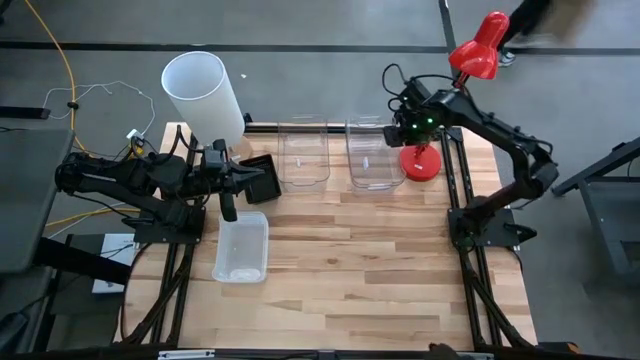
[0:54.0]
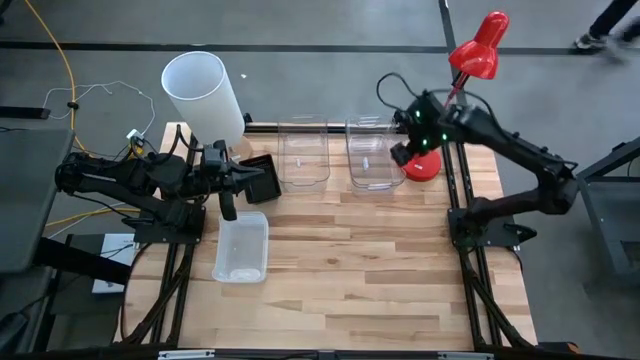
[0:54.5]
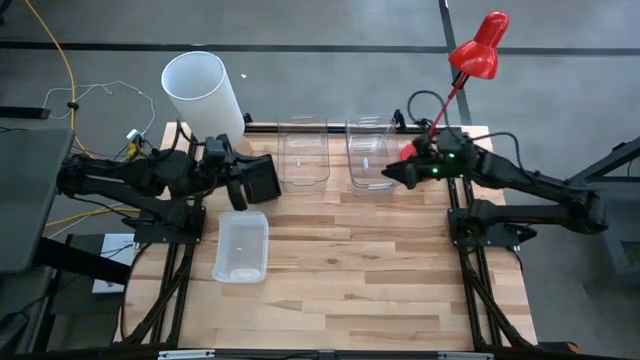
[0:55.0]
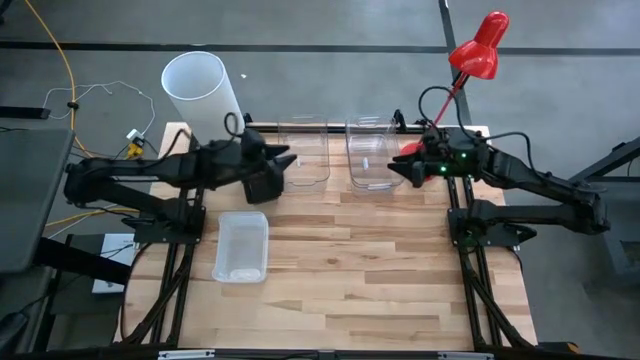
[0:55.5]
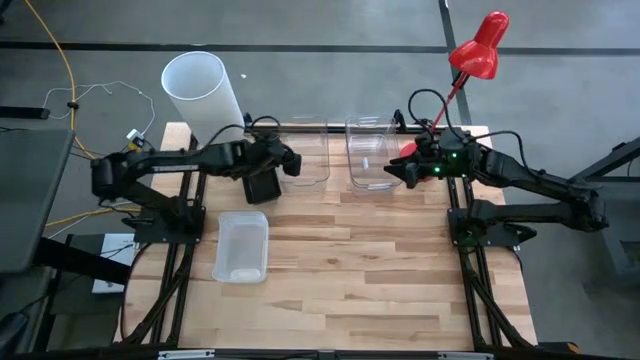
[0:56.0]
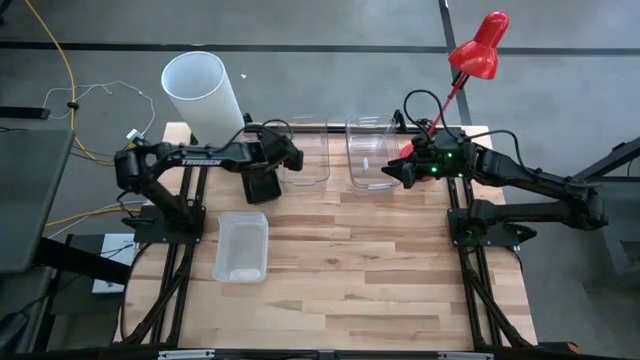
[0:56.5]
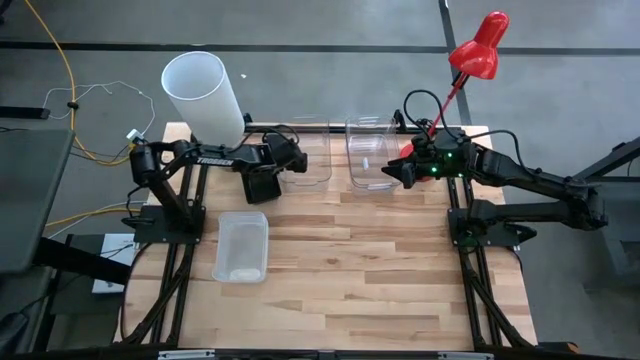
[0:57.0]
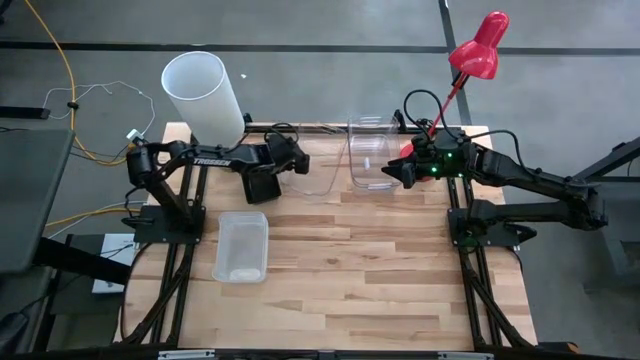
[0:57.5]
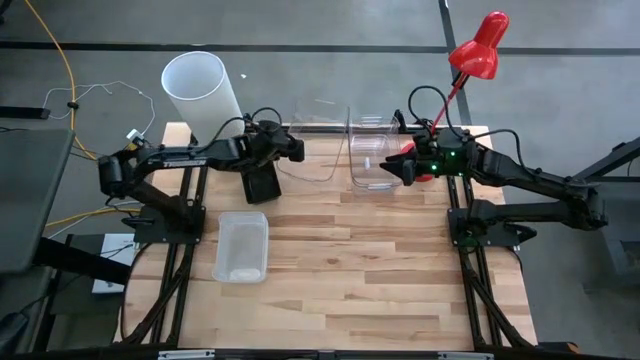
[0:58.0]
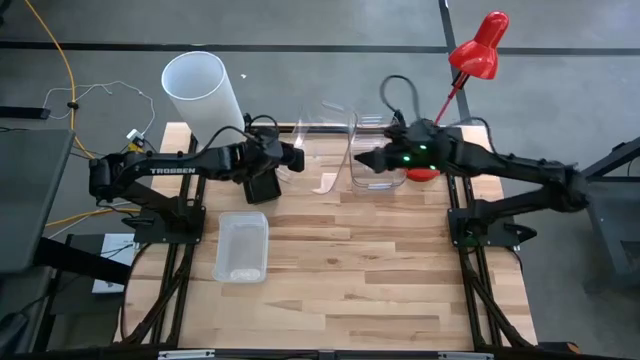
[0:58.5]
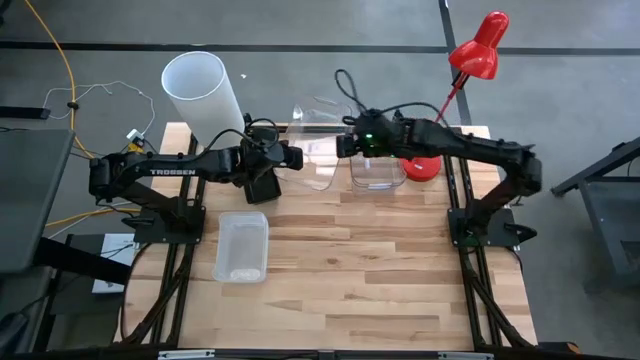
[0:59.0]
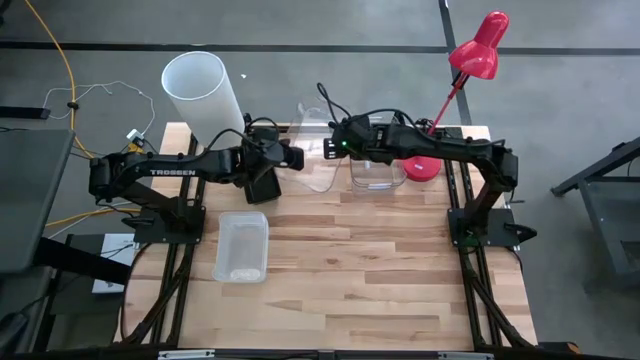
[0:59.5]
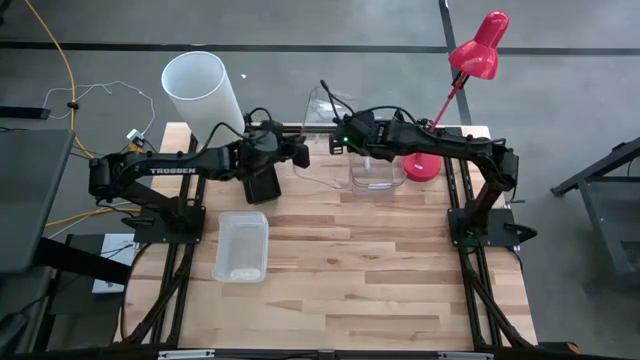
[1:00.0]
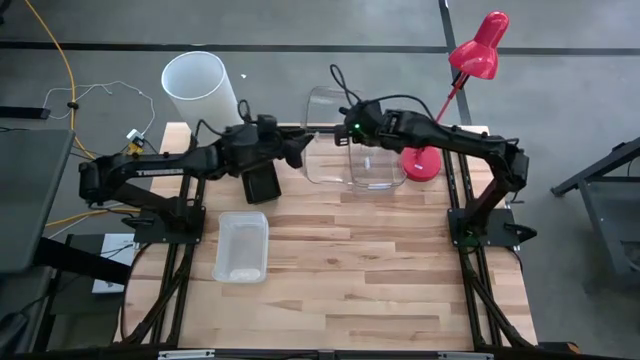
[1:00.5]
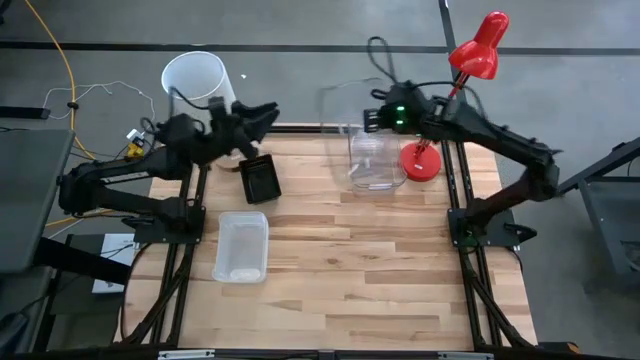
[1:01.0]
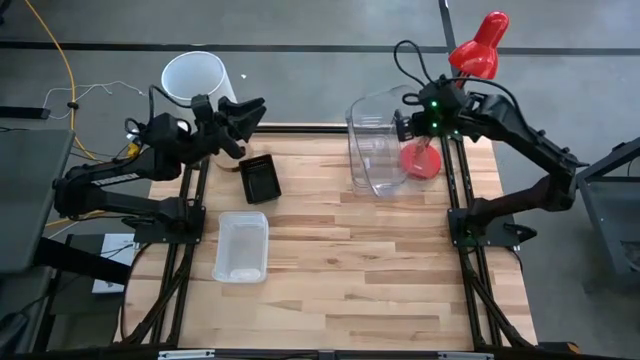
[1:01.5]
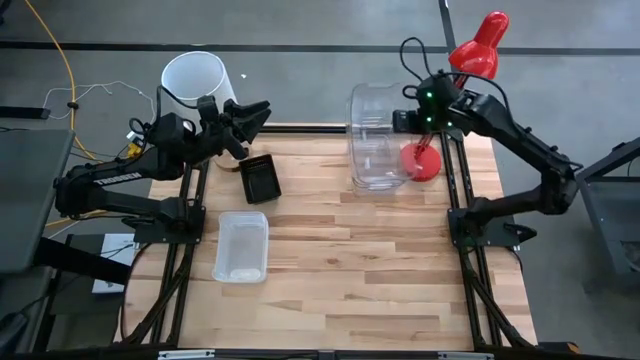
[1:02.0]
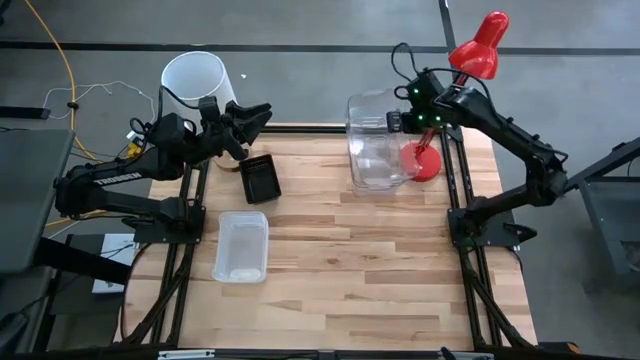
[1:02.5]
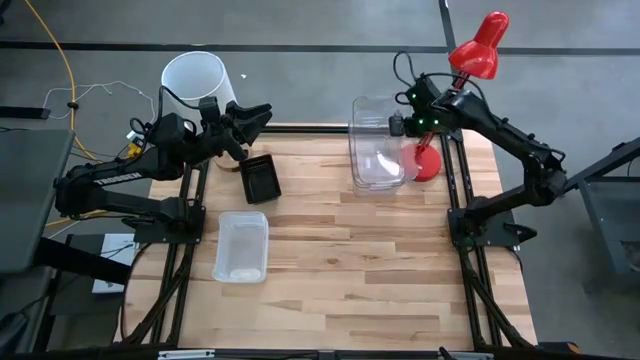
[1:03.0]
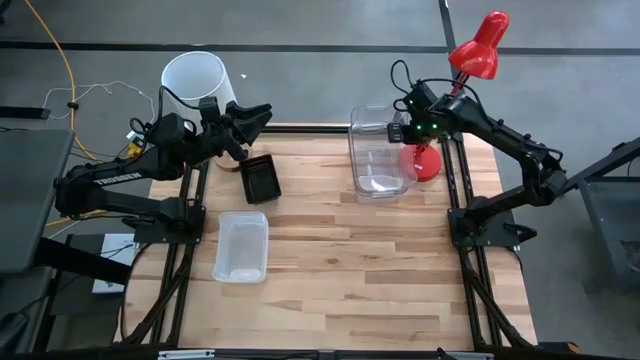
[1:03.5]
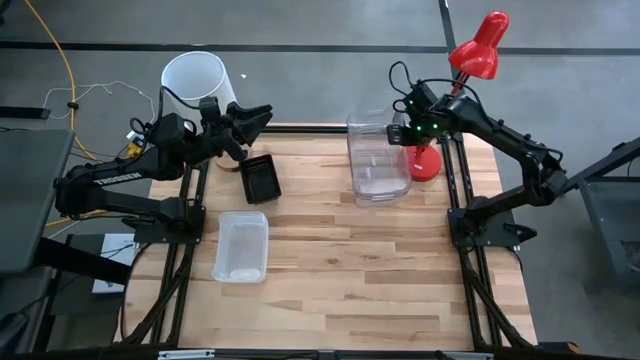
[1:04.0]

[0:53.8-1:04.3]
Stack the left transparent bin on the transparent bins

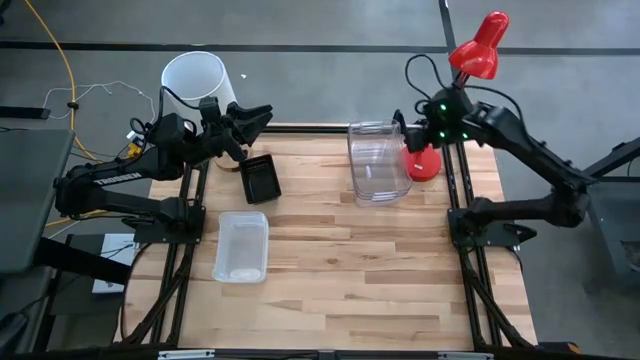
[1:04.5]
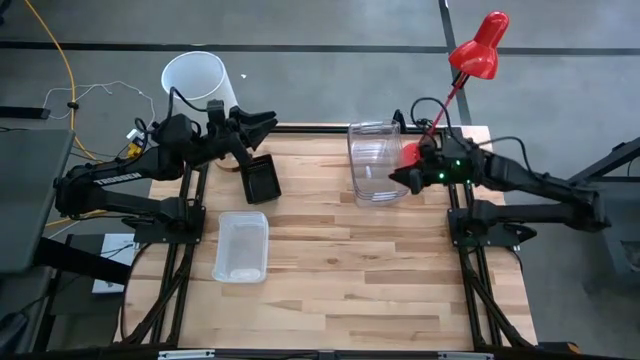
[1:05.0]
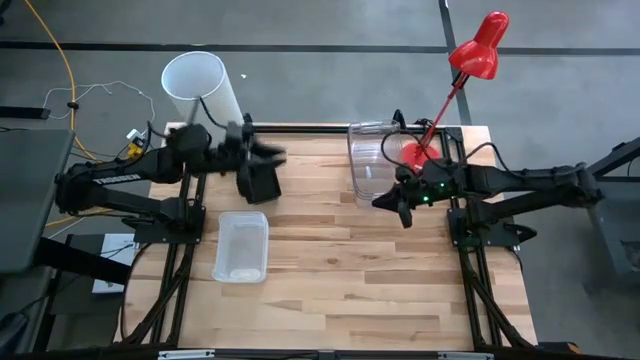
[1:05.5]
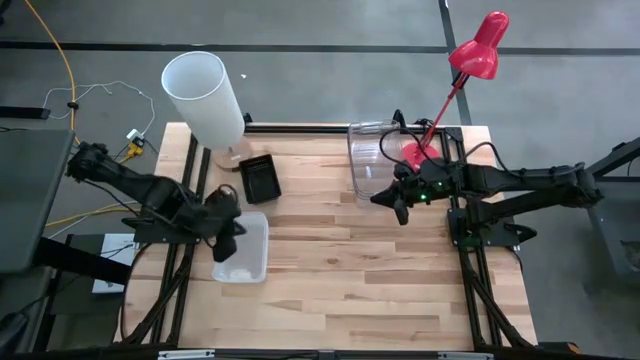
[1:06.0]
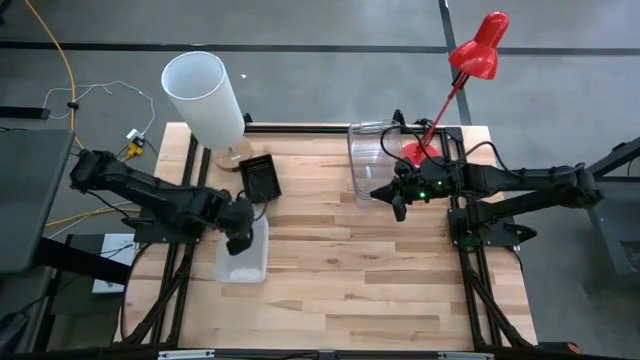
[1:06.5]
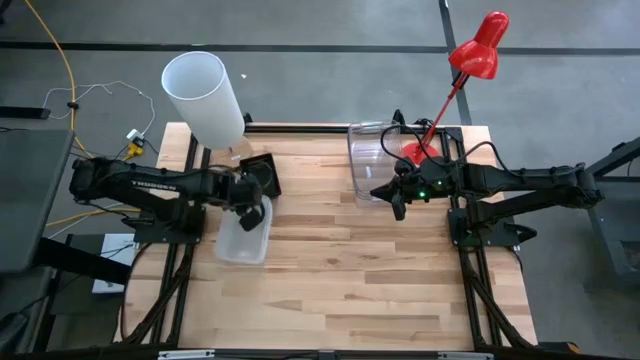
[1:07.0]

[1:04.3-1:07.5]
Move the stacked white bins to the middle left of the table

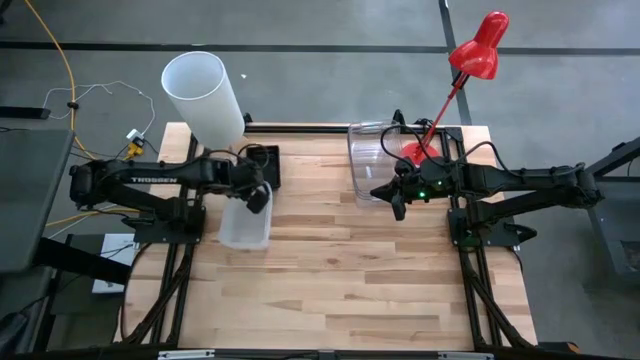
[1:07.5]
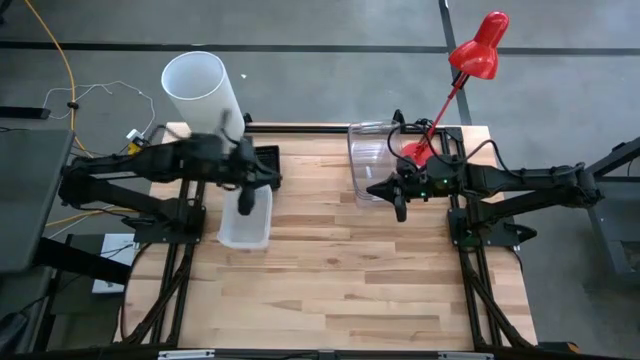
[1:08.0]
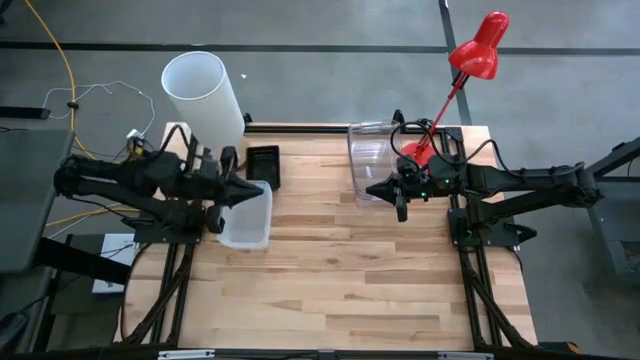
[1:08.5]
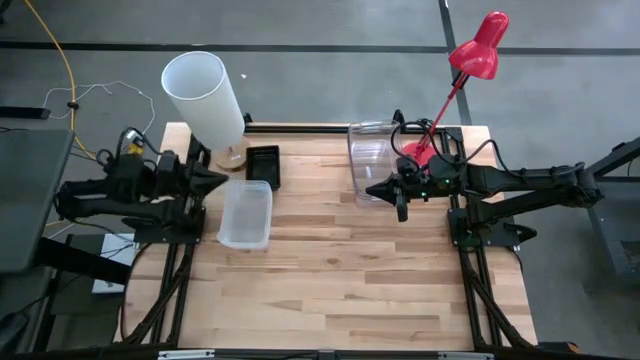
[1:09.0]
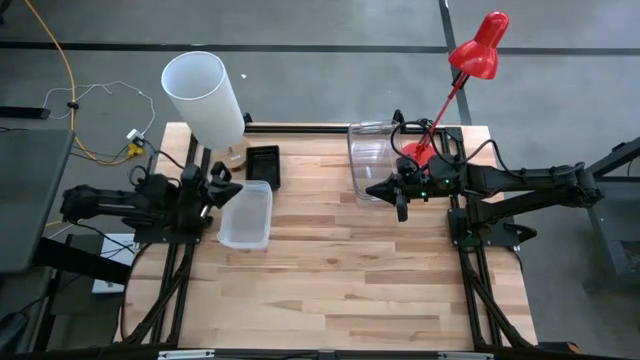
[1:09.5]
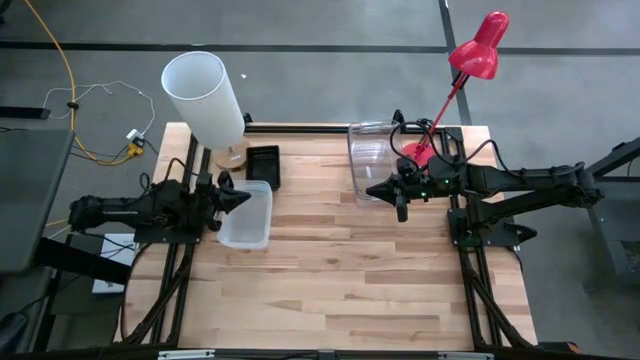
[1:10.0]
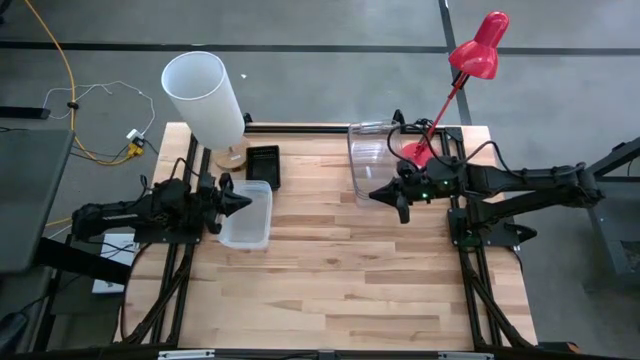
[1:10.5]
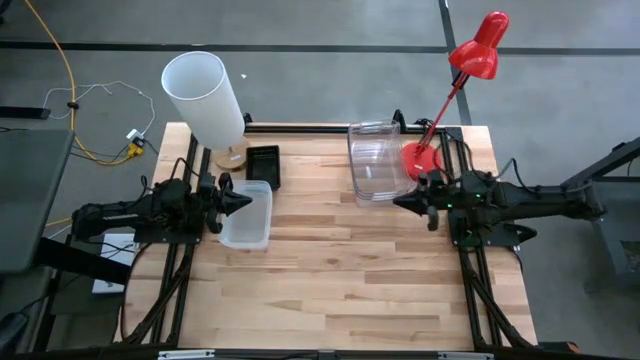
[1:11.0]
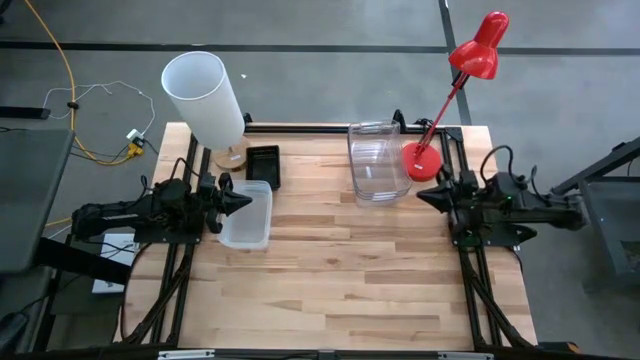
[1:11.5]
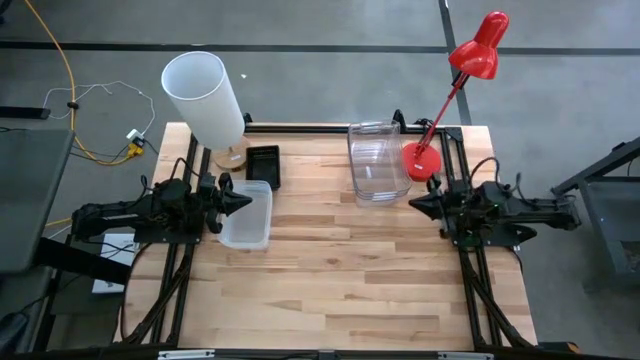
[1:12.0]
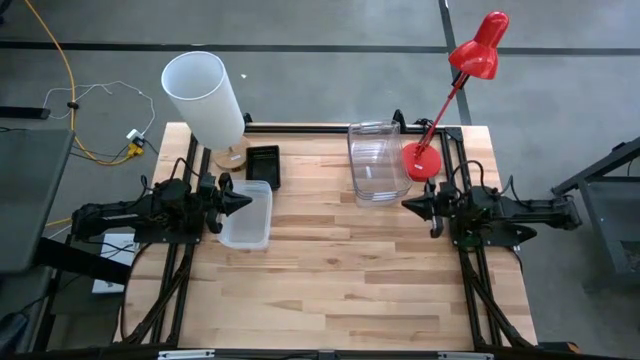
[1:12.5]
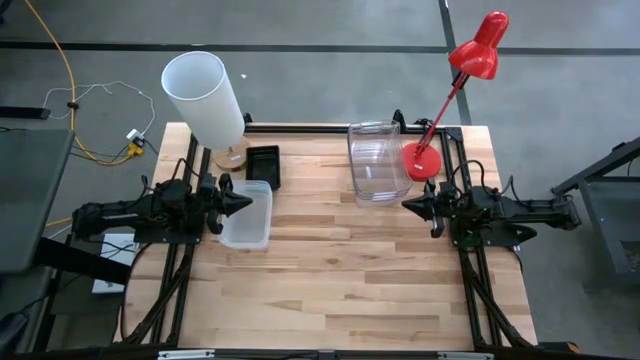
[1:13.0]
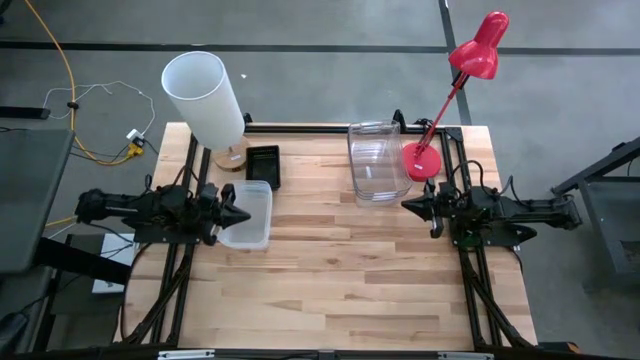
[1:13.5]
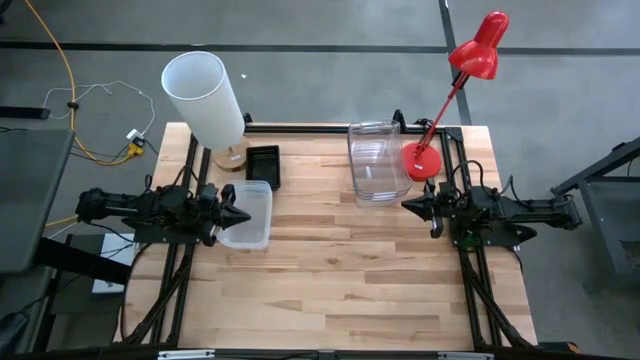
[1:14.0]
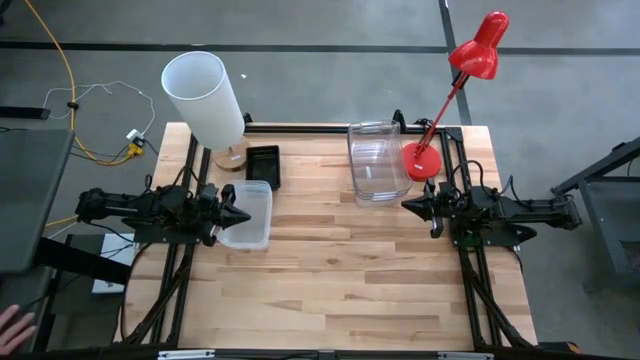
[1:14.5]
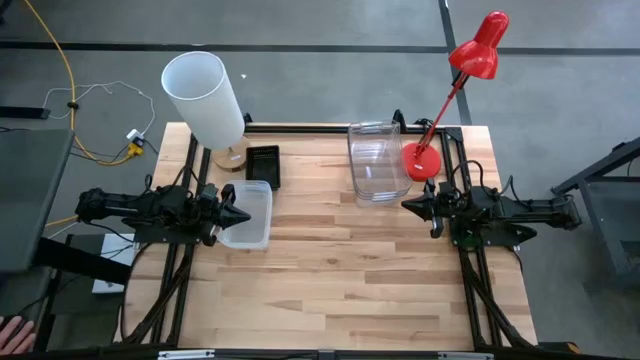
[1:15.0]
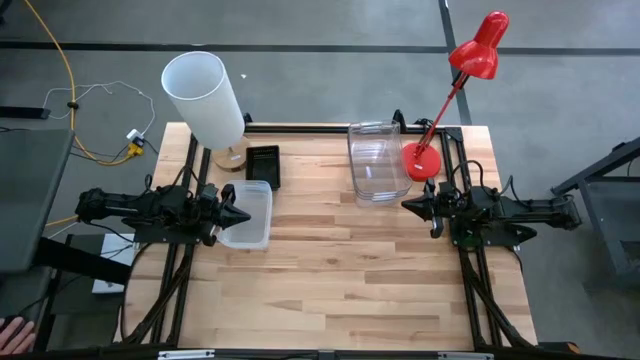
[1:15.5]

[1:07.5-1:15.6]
Return to Home Position
